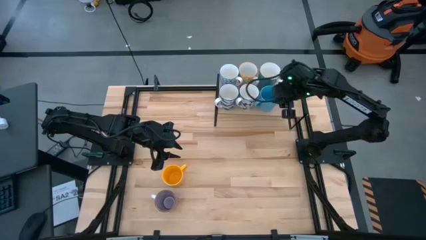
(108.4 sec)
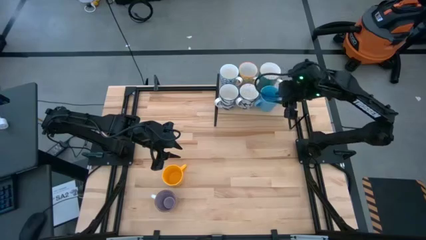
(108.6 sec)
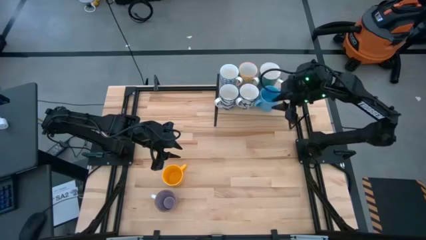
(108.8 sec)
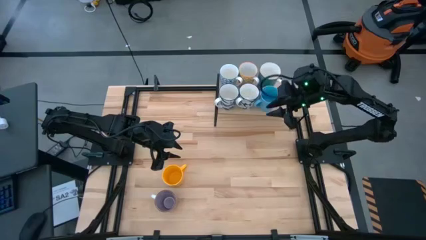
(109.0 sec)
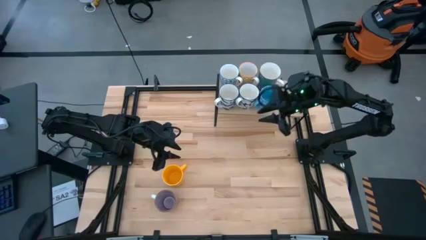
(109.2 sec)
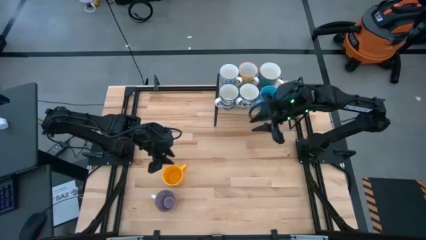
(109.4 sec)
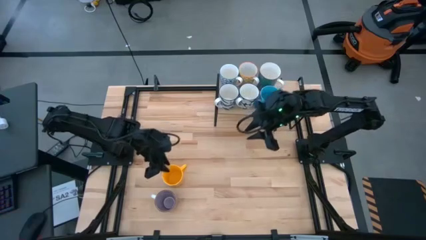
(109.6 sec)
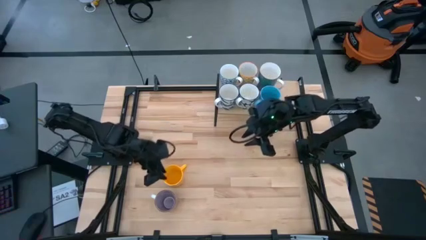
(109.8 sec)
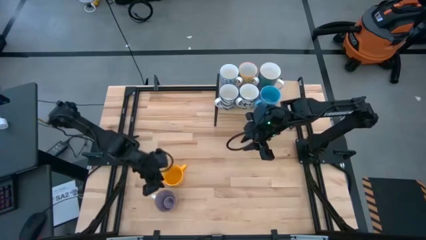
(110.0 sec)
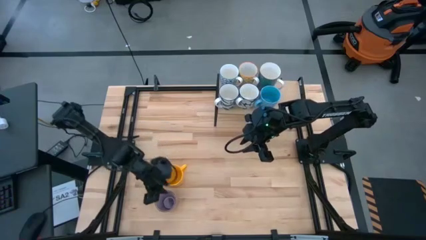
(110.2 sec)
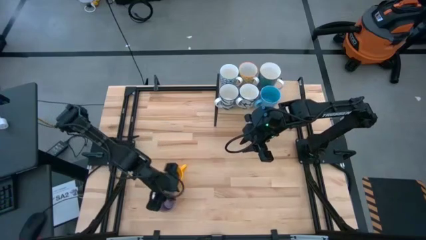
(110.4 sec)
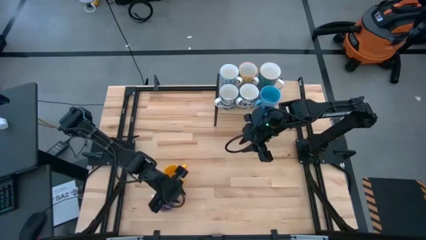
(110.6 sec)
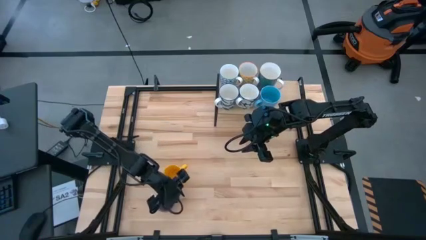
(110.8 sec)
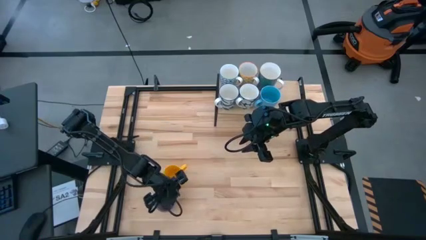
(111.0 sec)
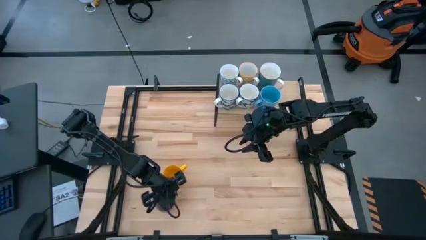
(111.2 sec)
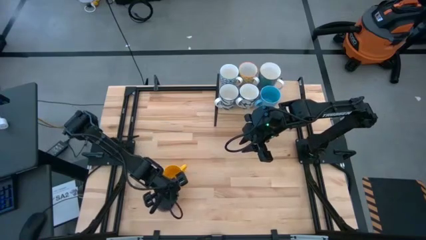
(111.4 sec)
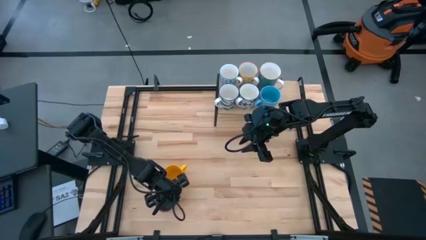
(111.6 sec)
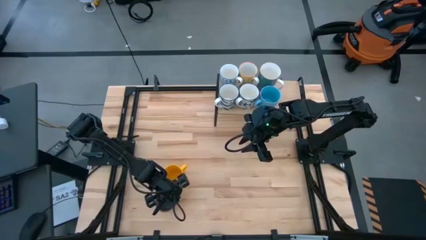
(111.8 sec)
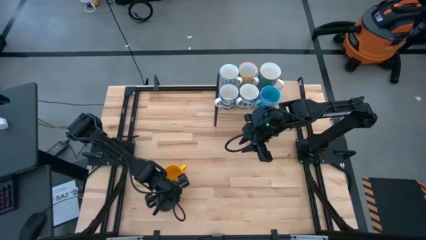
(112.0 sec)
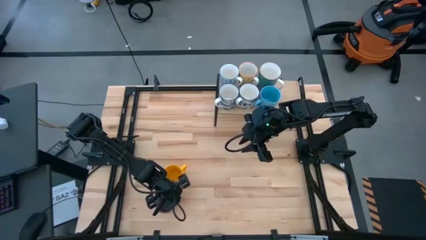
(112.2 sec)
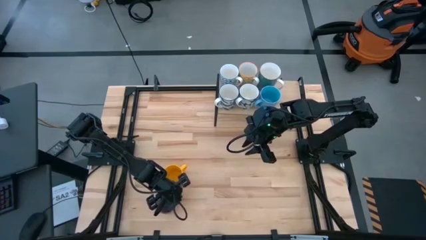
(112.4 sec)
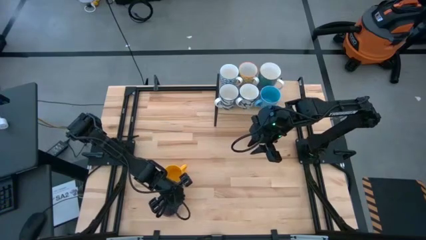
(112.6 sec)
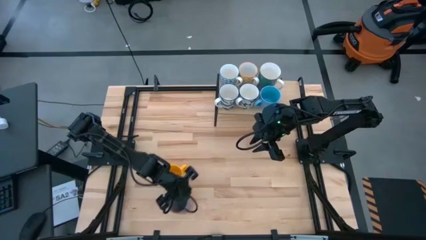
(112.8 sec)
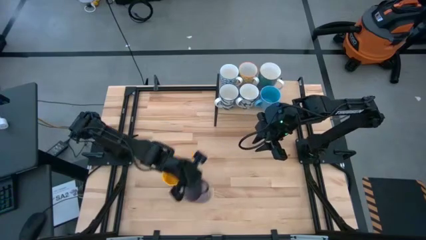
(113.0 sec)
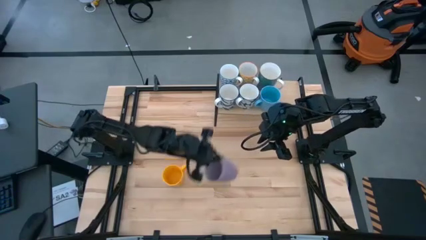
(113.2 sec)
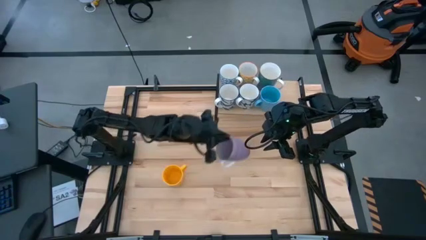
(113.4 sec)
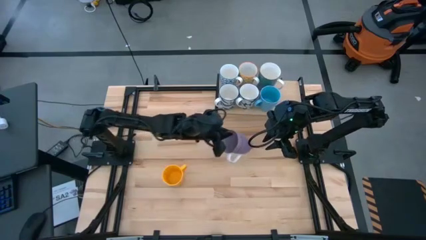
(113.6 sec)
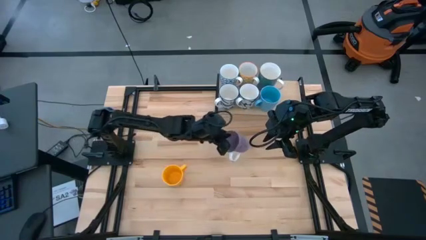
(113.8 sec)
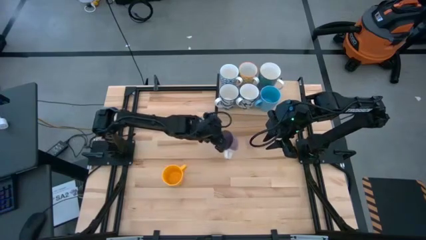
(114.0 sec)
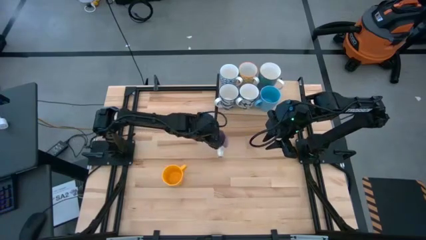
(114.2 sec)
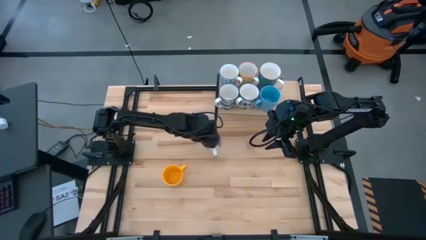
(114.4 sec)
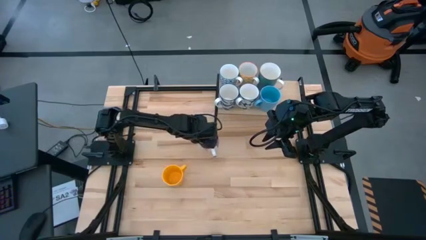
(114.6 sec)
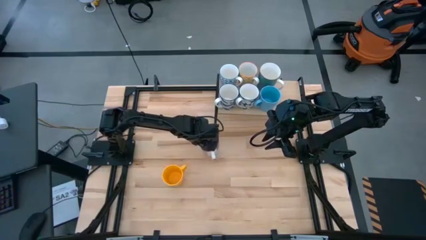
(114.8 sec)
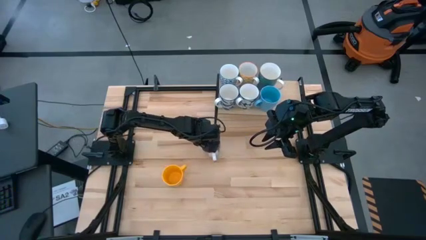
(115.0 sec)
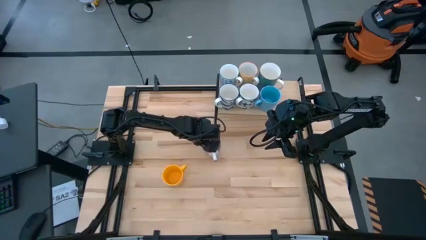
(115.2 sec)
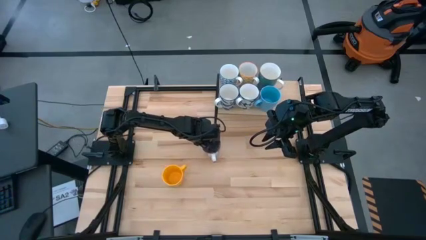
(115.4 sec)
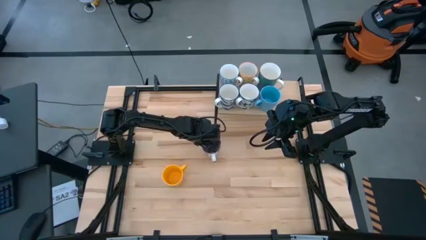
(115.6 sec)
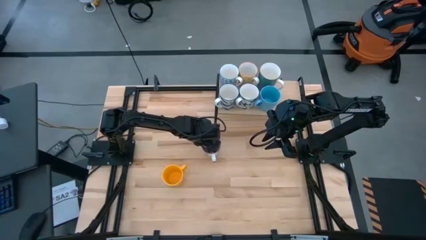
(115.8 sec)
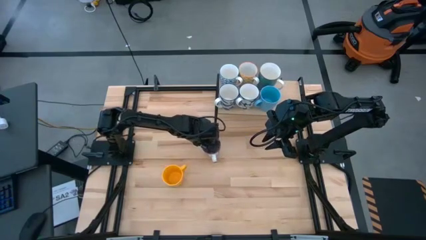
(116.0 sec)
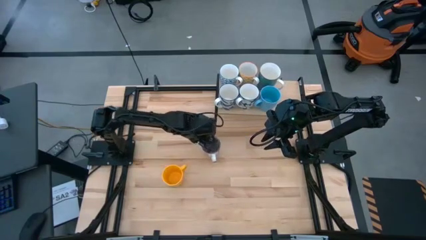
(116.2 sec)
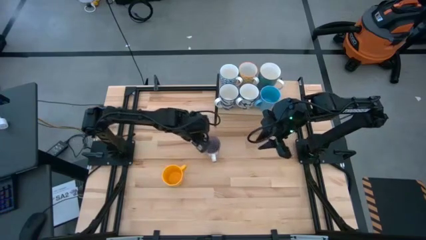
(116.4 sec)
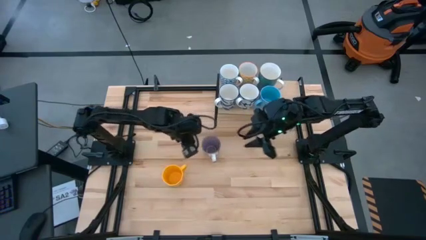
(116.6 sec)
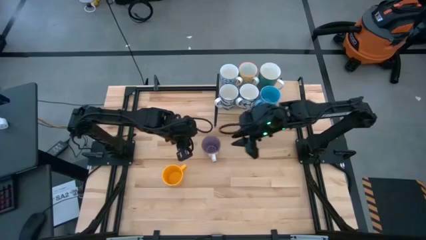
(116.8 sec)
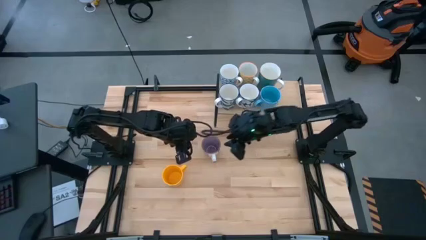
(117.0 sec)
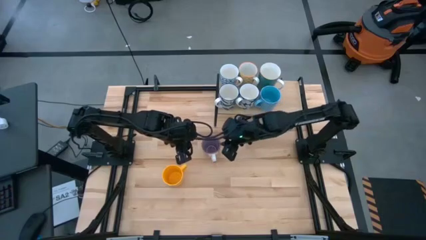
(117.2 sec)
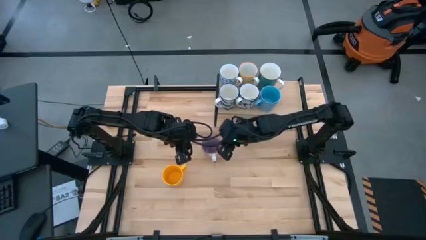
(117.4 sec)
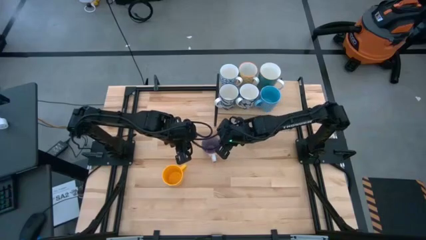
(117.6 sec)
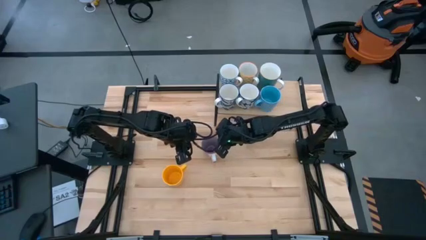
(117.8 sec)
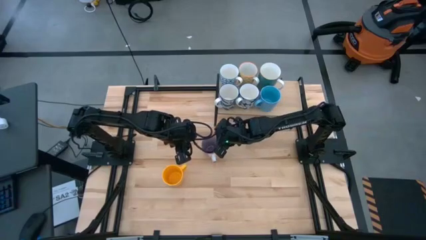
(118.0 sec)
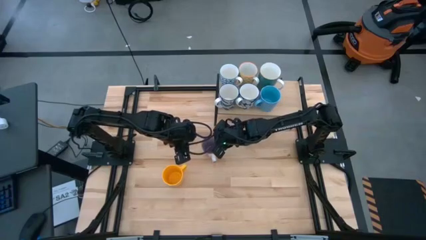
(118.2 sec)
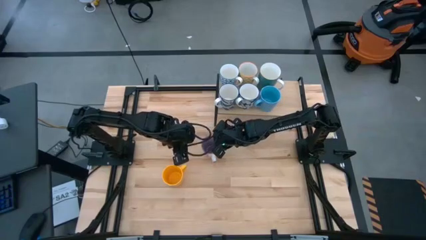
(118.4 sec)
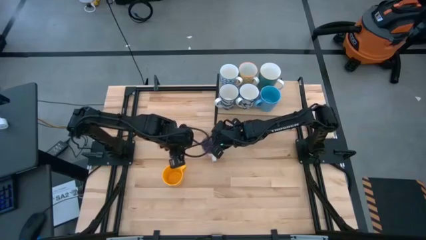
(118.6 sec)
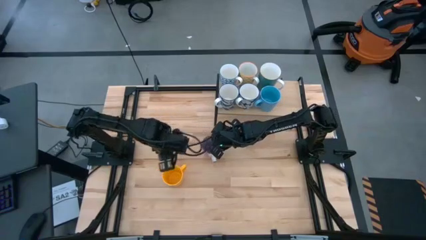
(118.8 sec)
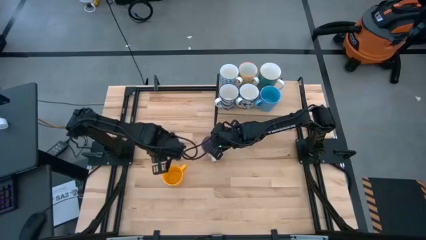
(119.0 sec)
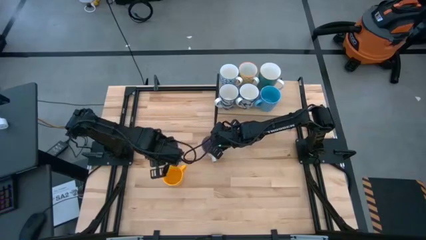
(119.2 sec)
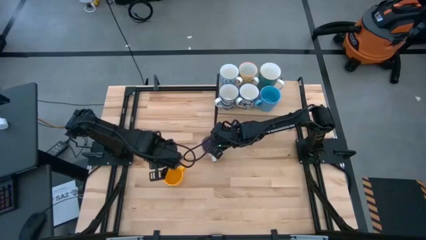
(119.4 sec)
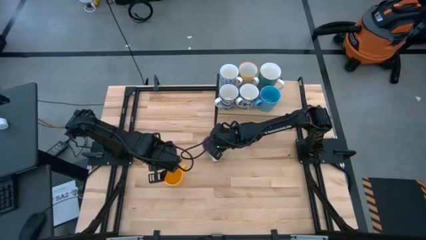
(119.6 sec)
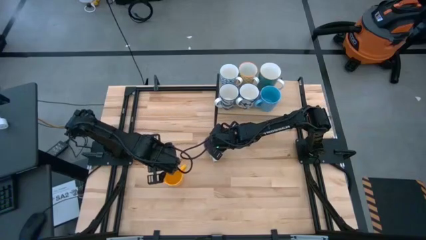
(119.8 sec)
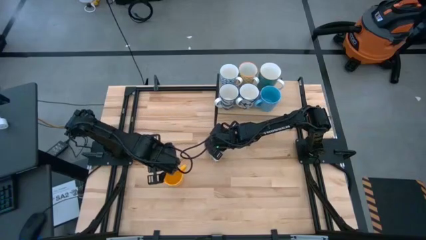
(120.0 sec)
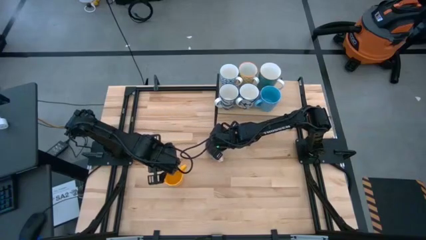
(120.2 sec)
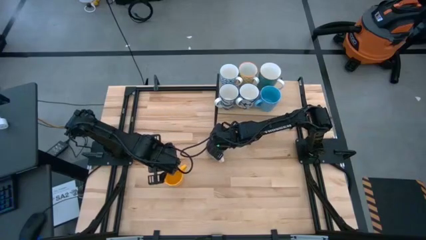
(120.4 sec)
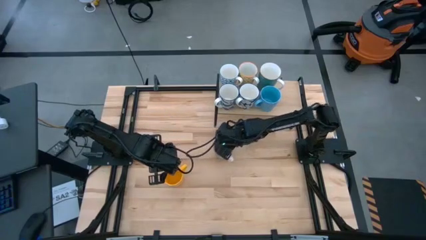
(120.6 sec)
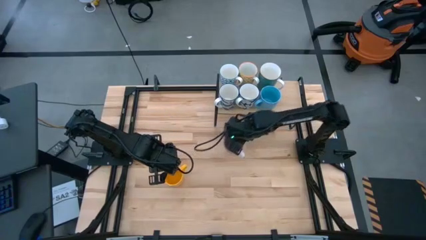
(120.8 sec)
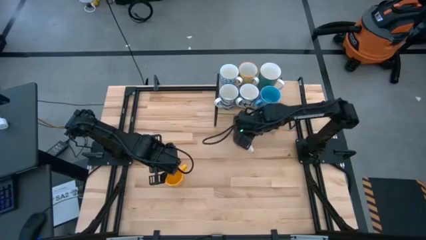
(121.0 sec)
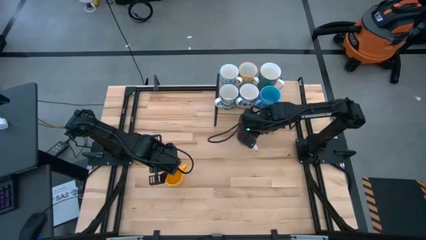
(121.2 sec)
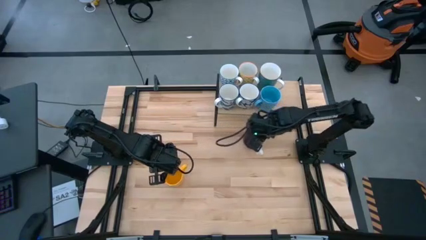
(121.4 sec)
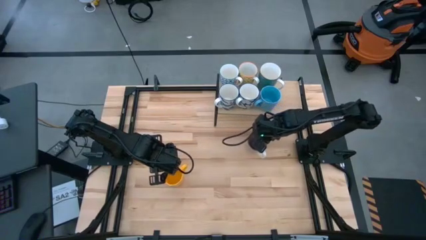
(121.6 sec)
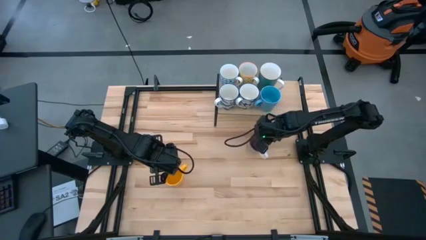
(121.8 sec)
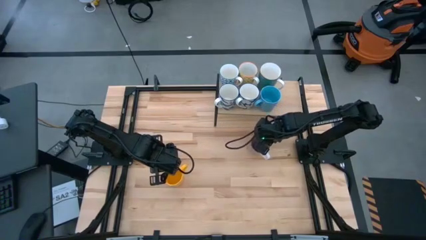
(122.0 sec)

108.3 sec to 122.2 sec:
Task: Place coffee mugs
Put the purple mug on the shelf

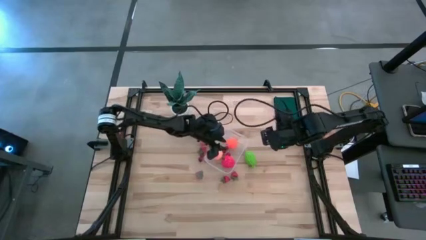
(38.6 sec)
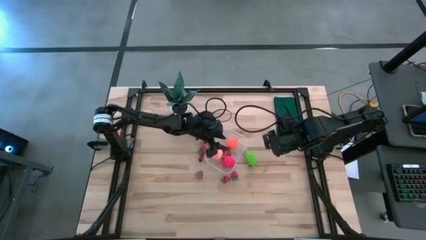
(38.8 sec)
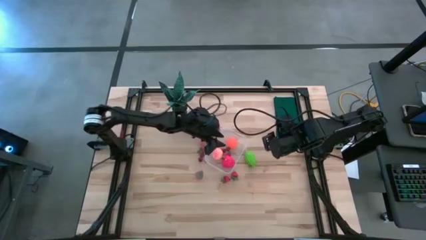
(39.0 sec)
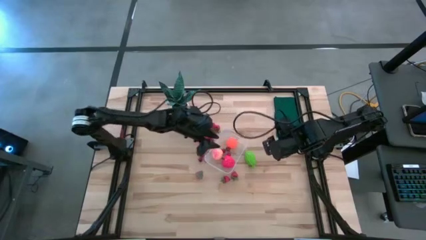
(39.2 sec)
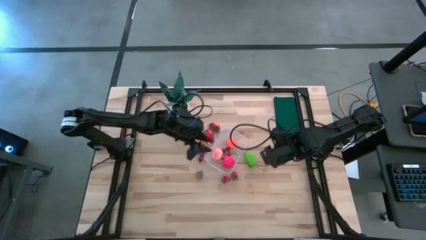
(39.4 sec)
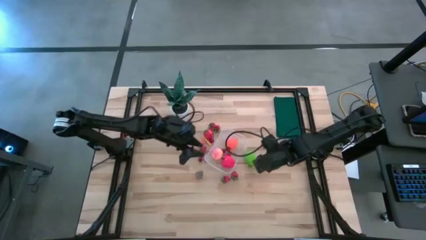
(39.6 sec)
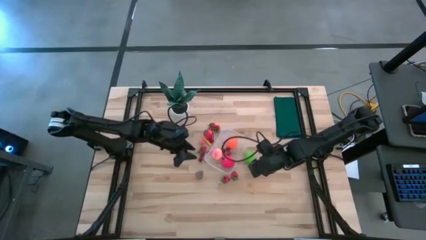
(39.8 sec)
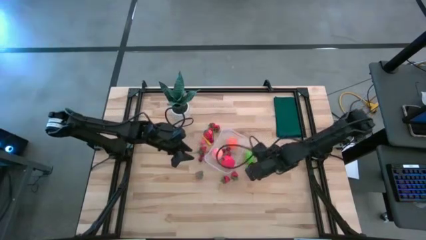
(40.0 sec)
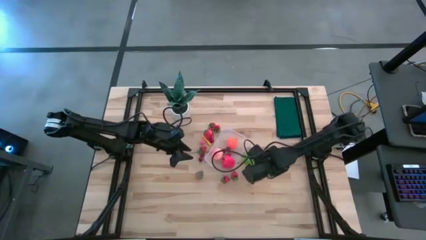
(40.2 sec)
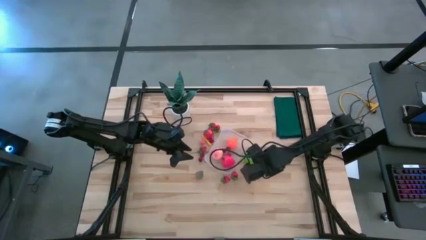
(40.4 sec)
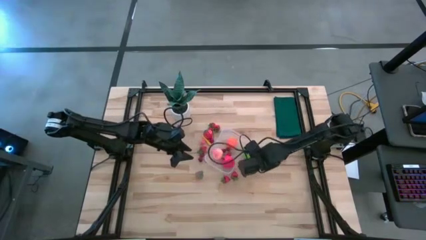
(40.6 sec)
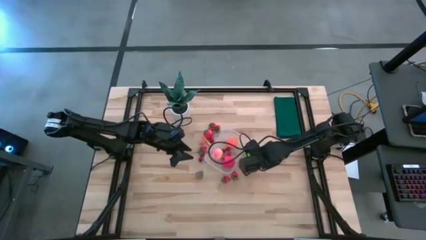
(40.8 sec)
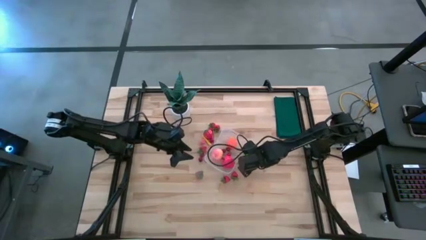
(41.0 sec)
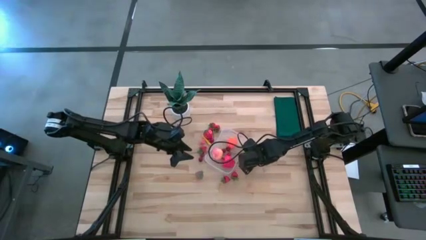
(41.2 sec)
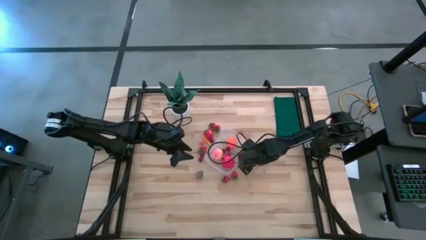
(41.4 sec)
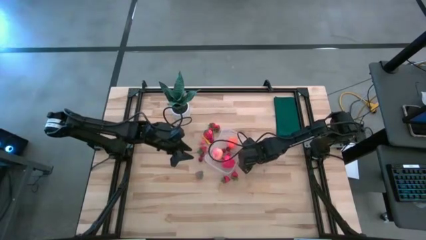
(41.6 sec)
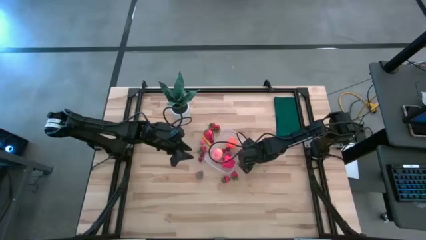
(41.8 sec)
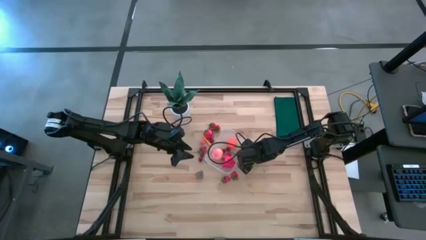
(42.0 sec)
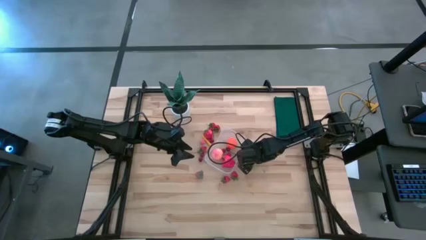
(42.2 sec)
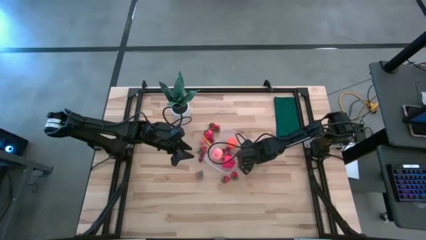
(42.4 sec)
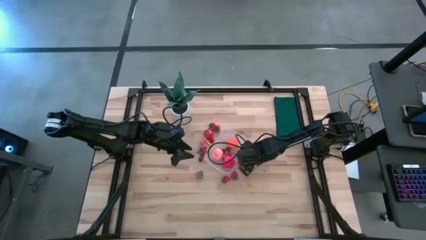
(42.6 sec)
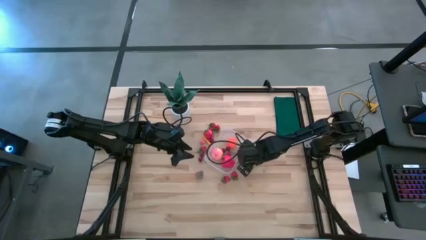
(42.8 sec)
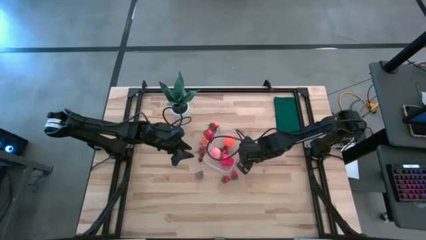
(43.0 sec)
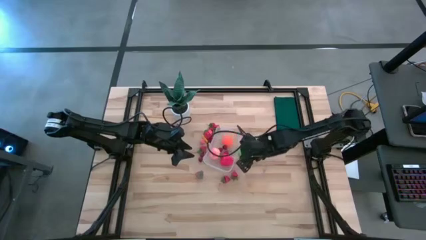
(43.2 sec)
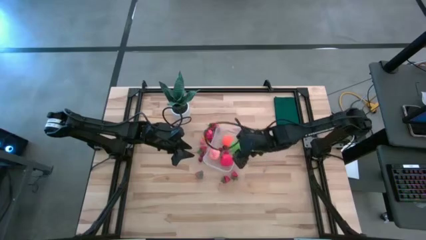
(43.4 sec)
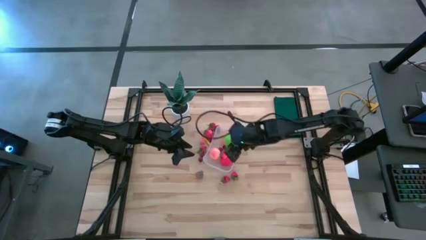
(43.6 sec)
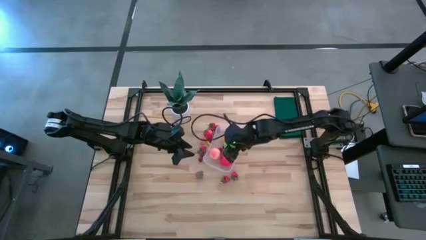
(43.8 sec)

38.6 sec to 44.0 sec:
Task: Pick and placing Produce into tupperware
Put the green cabbage into the container
